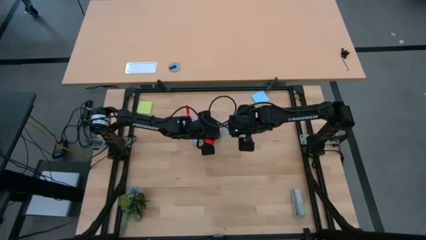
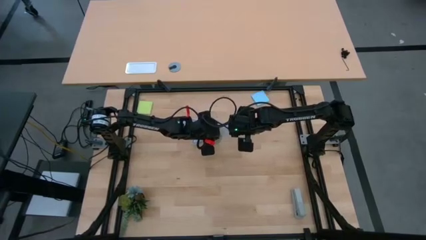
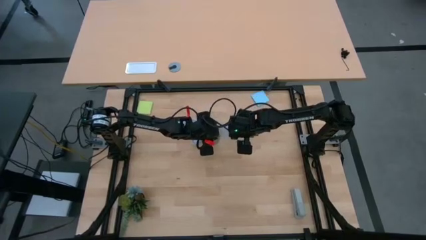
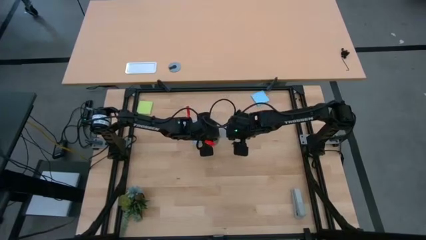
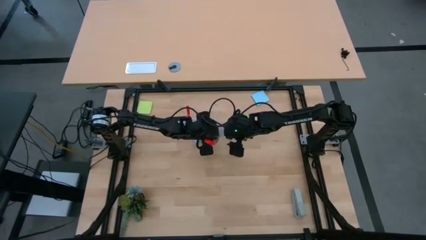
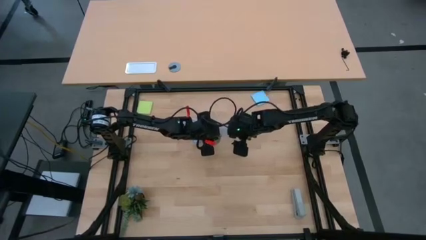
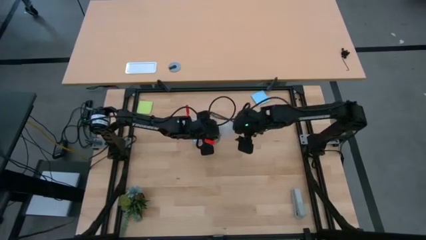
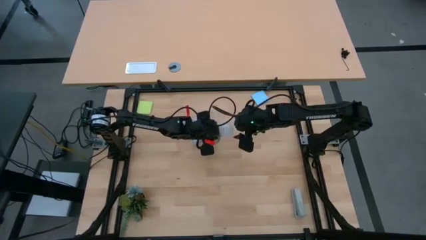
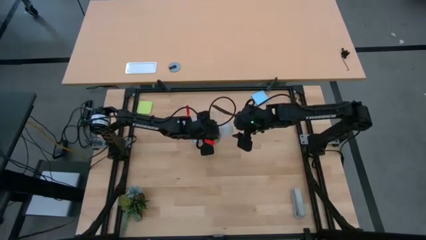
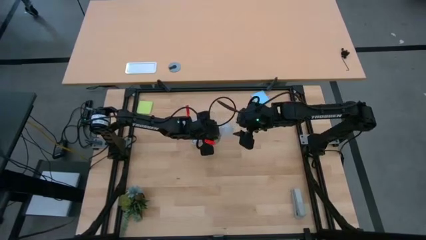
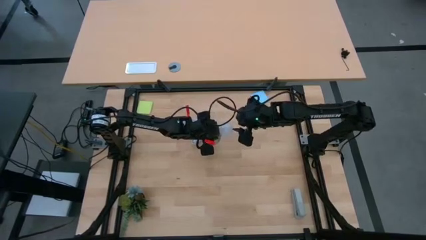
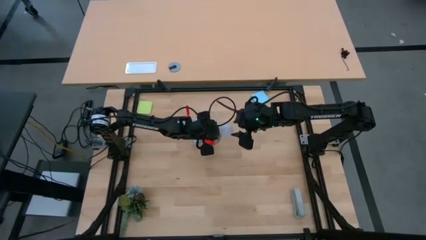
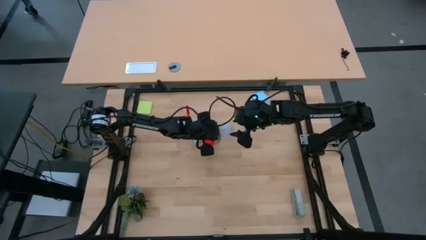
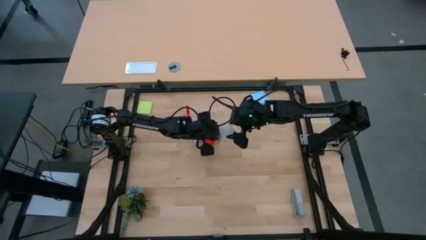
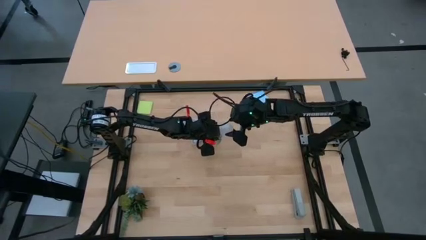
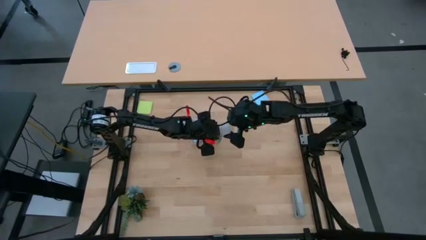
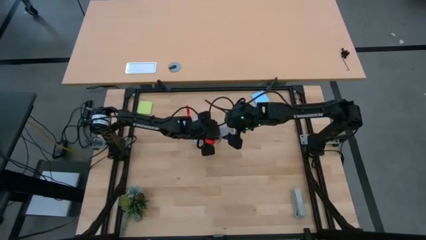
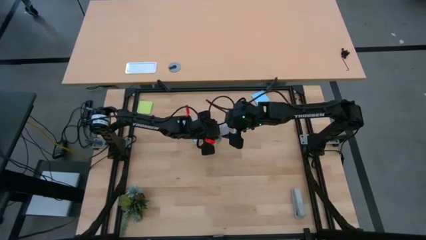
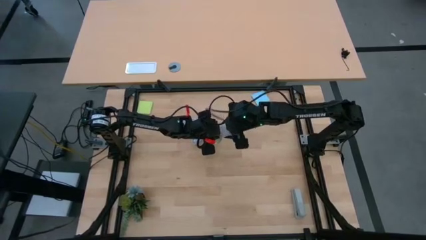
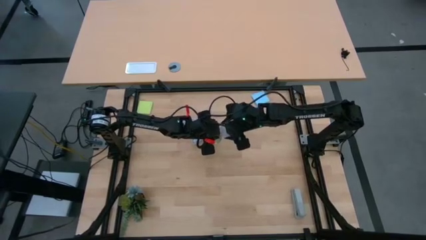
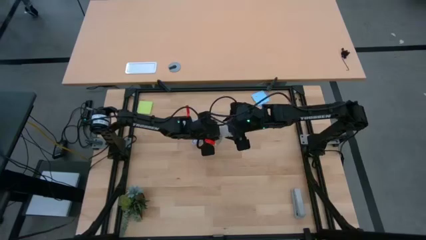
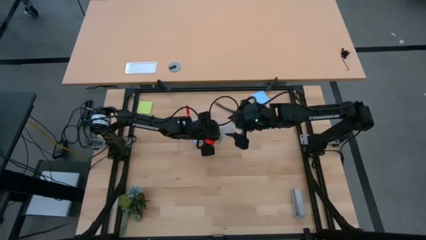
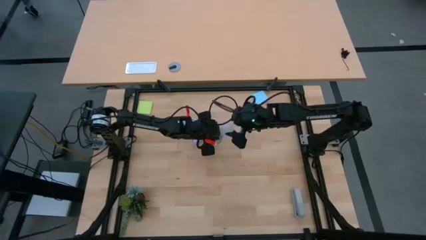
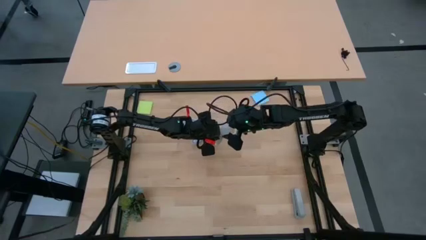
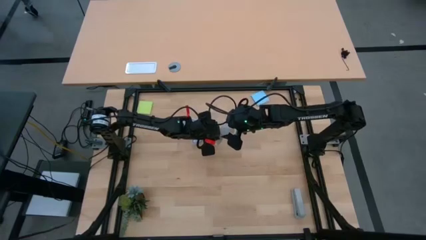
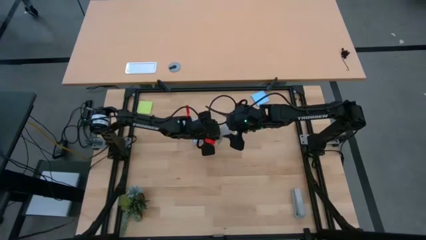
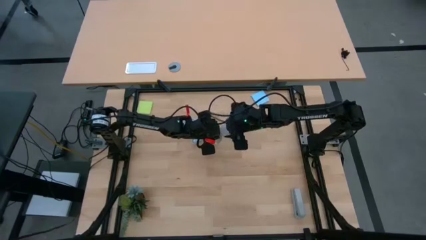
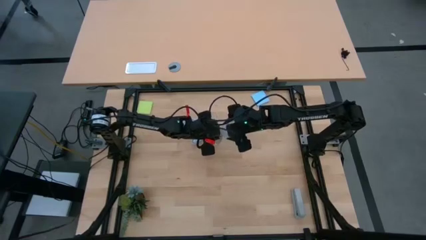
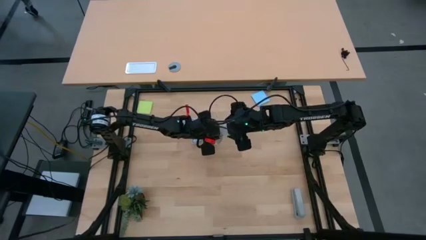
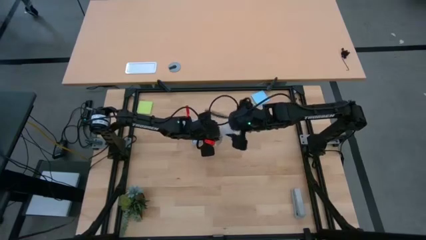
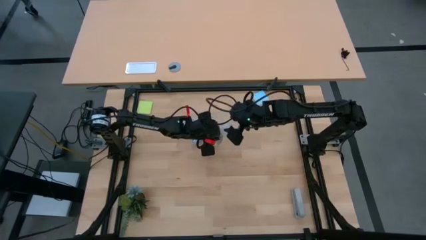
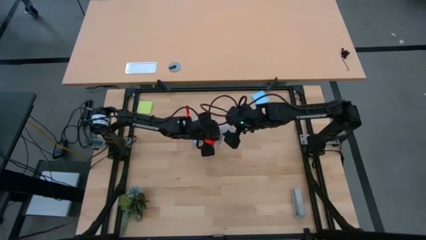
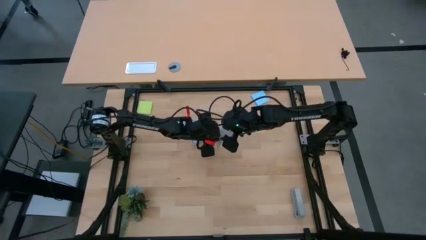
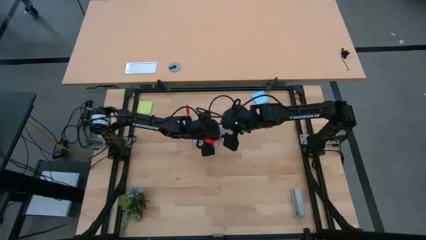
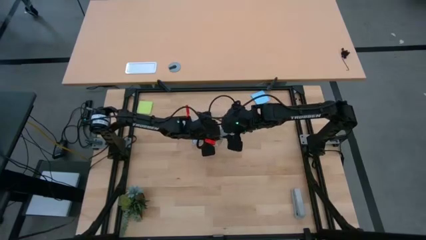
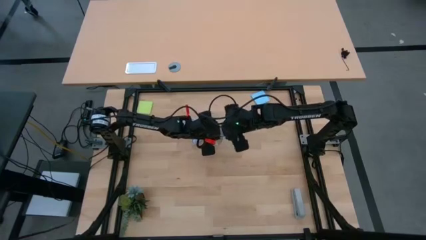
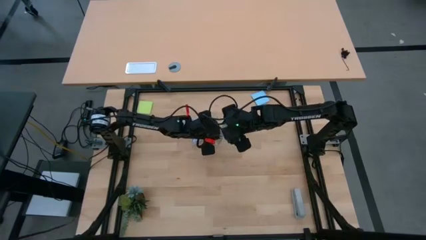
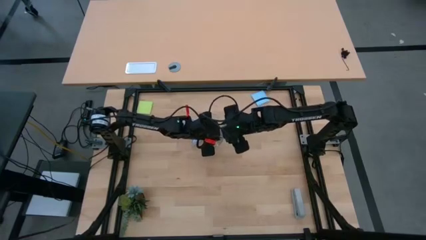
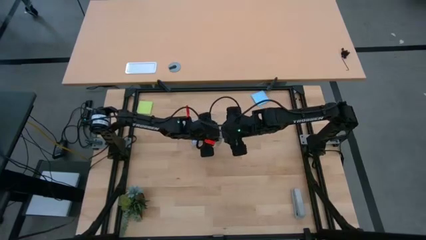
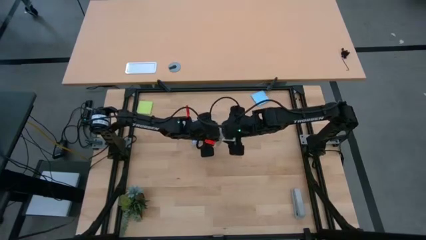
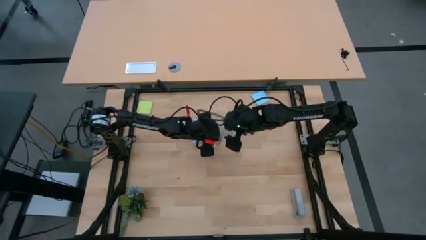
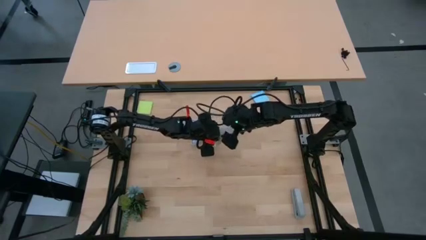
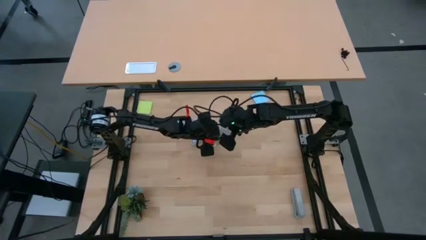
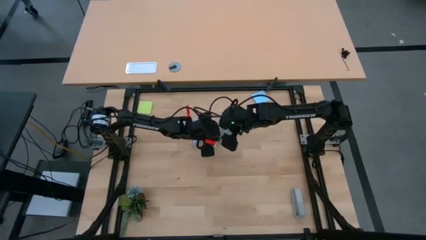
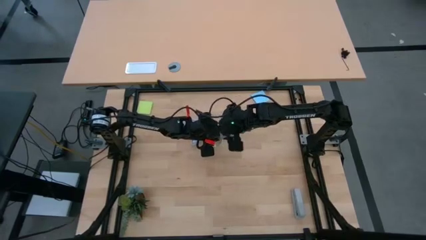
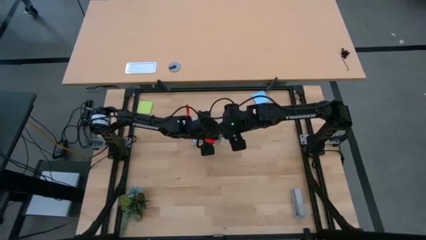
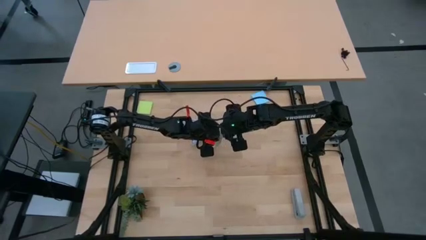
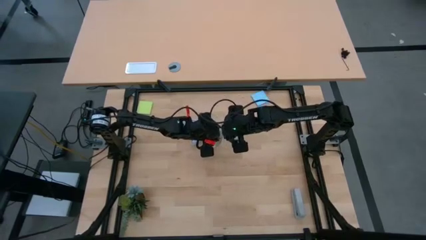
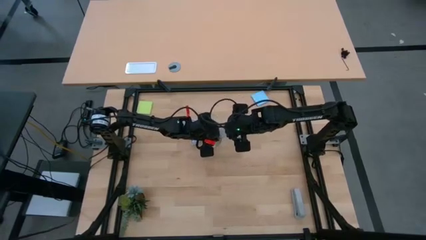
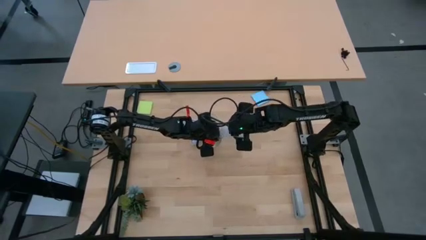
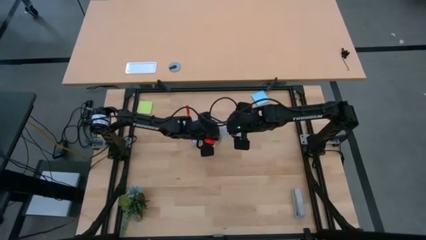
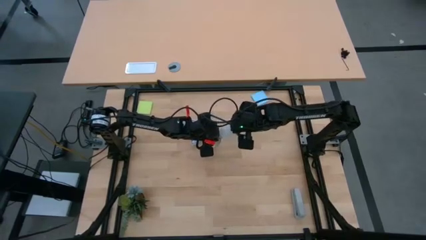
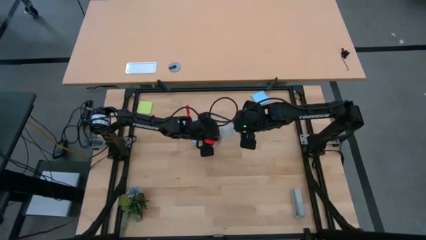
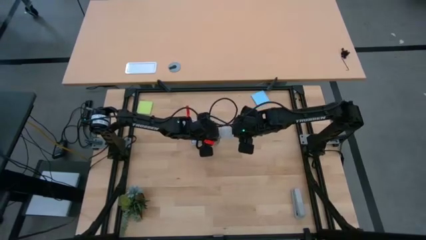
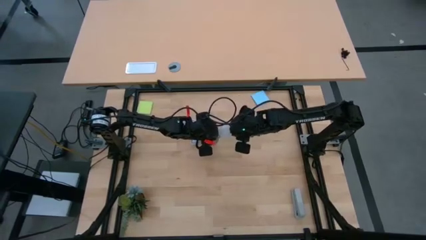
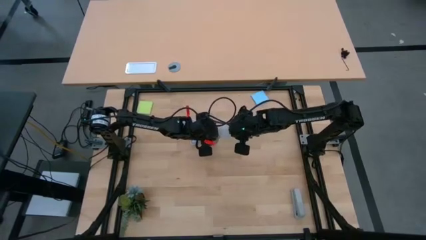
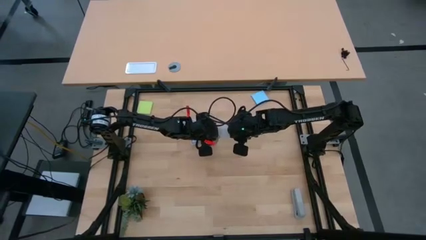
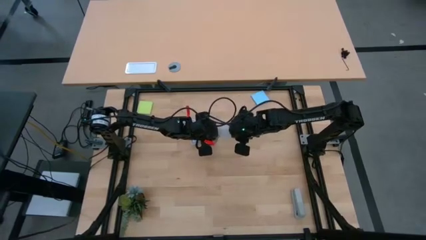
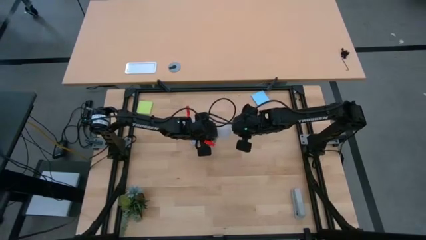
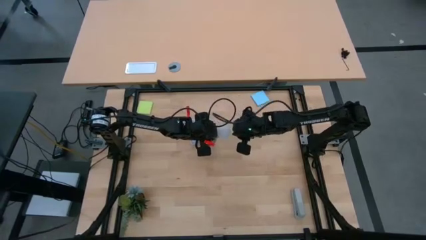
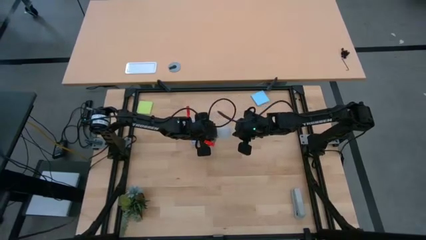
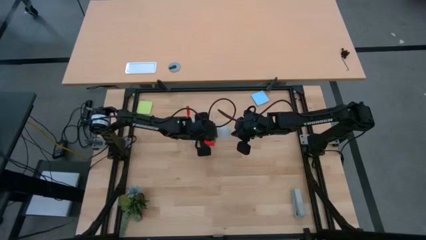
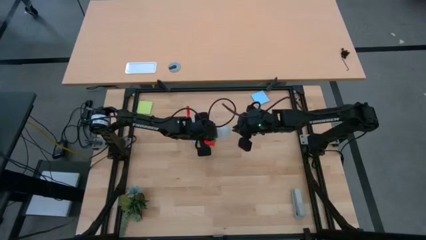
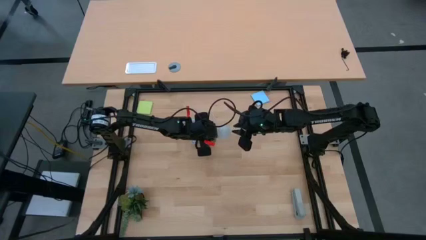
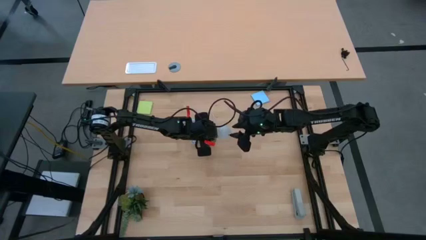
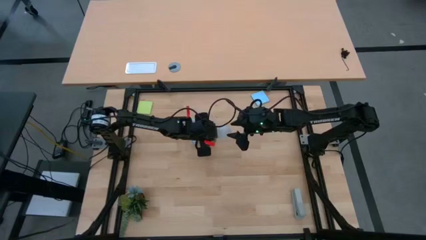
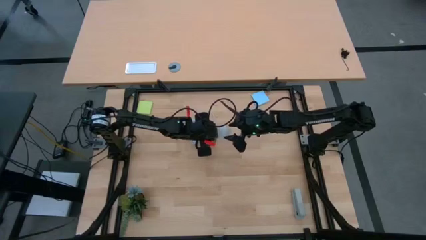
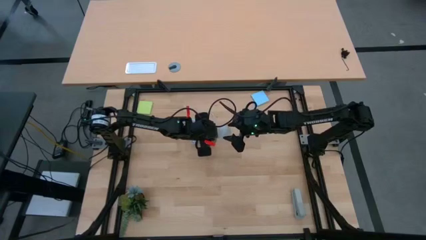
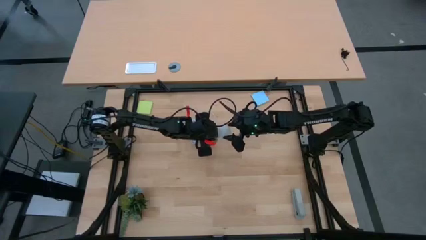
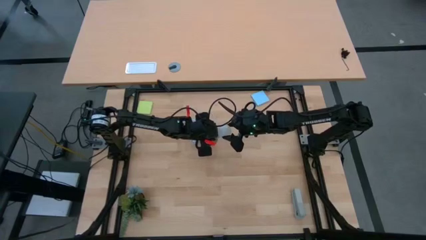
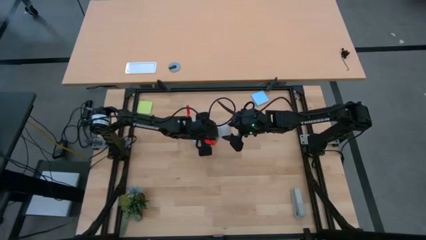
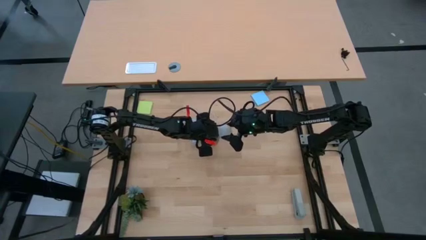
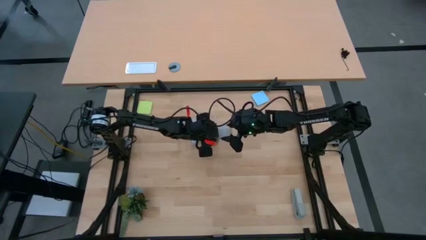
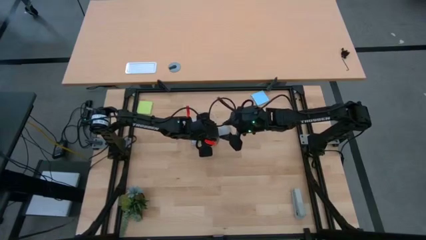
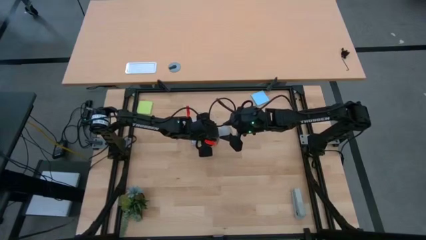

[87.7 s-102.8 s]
Task: Screw lightbulb
Remove the light bulb from the lamp

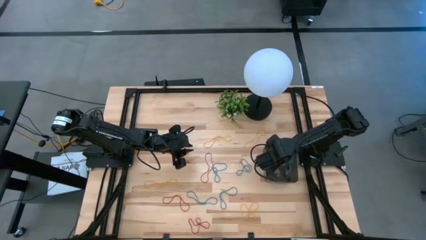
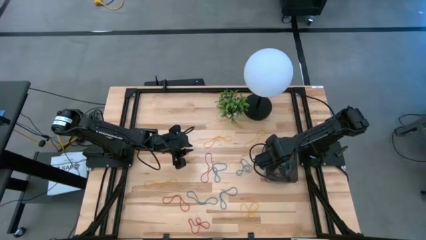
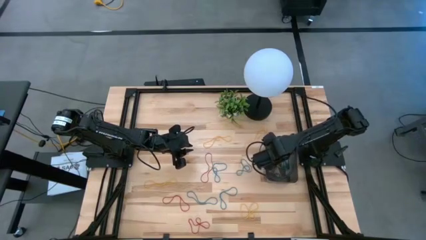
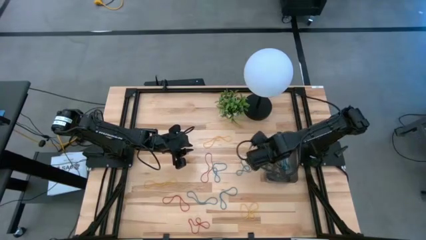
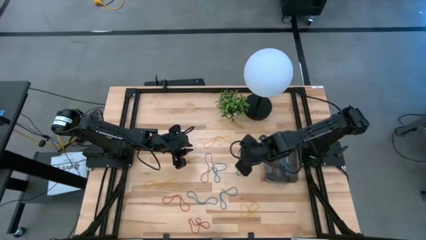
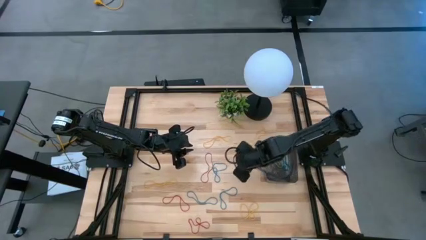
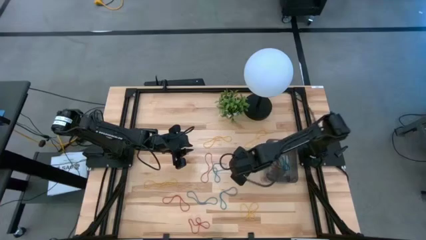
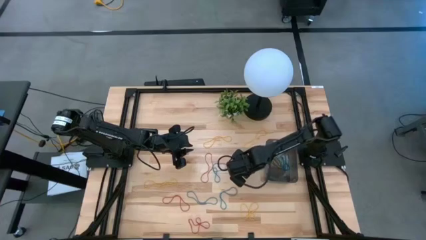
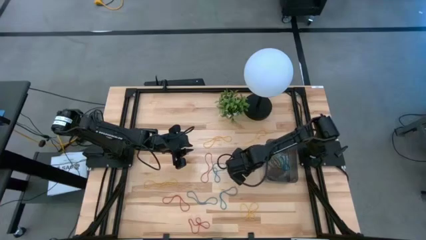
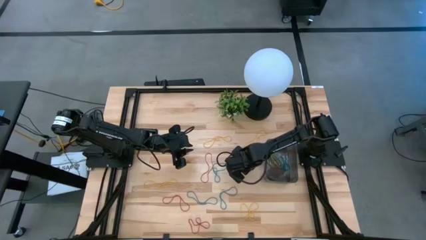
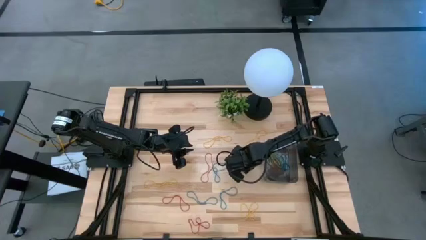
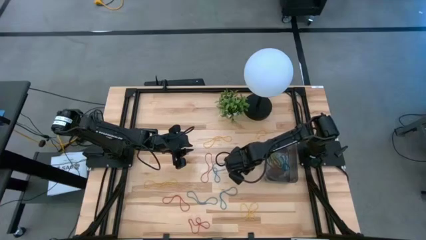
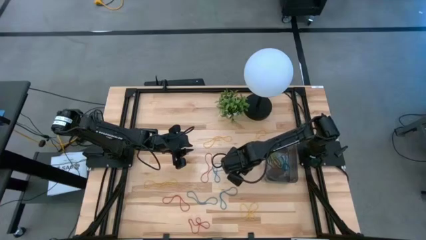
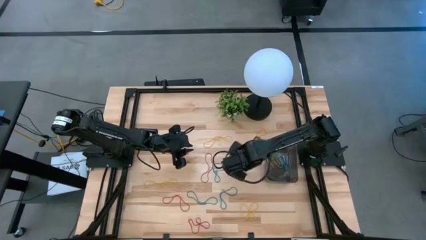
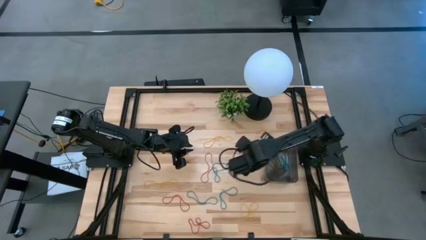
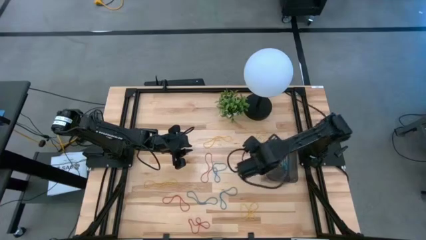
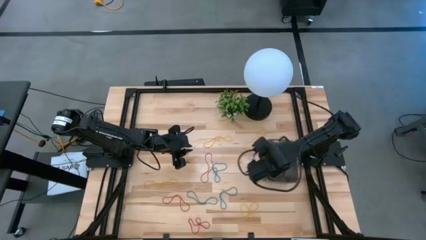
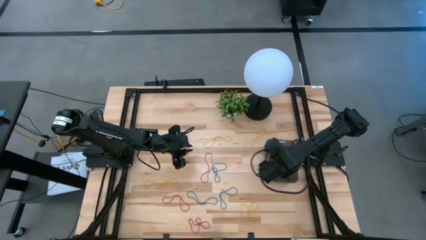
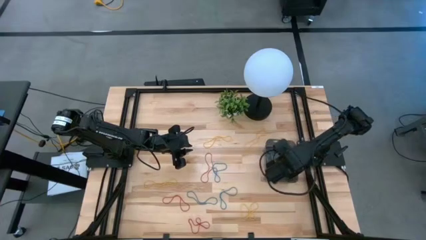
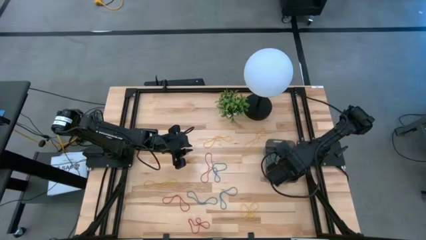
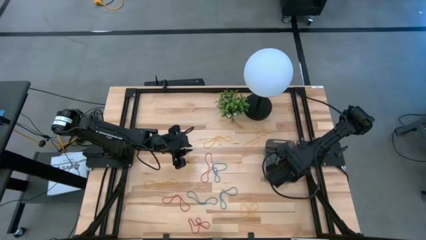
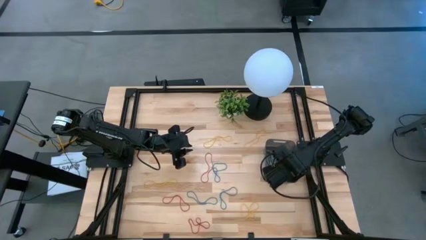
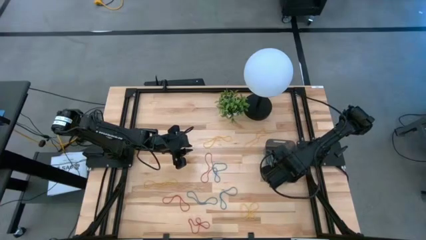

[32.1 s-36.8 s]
Task: Pick and place items into bin
Put the blue rubber band into the black transparent bin
